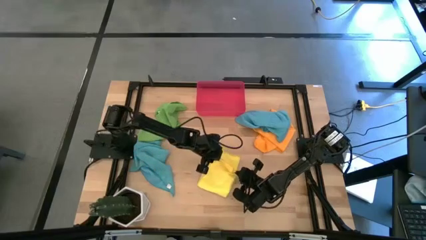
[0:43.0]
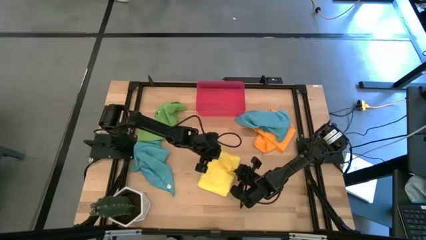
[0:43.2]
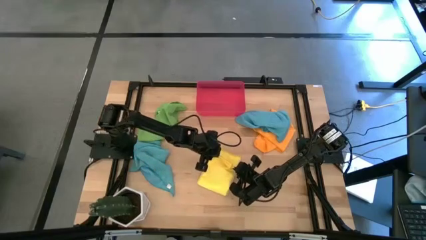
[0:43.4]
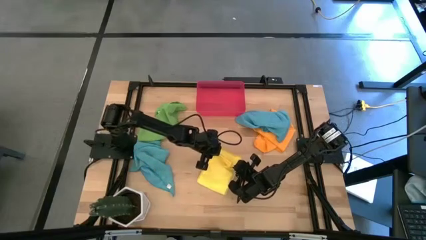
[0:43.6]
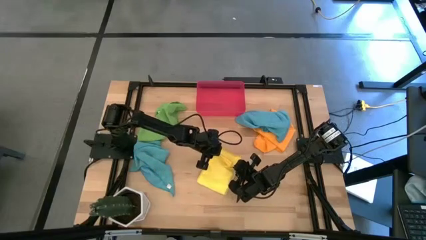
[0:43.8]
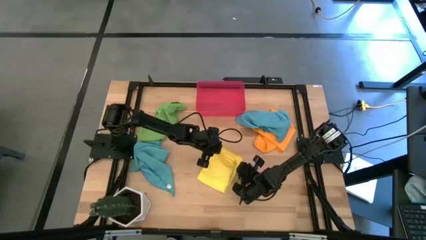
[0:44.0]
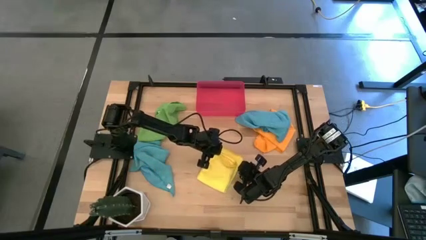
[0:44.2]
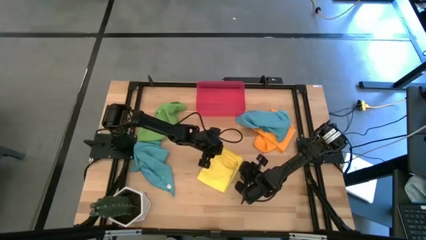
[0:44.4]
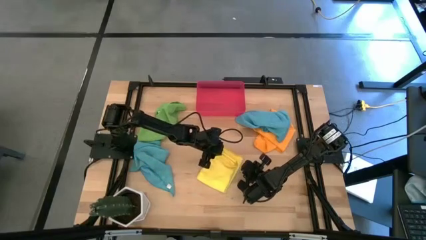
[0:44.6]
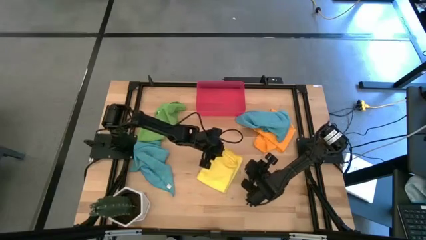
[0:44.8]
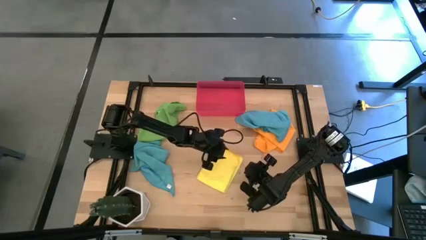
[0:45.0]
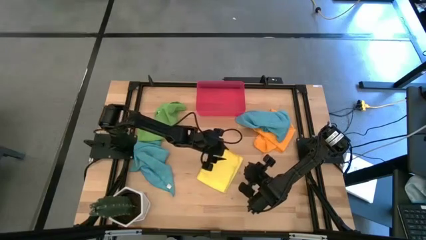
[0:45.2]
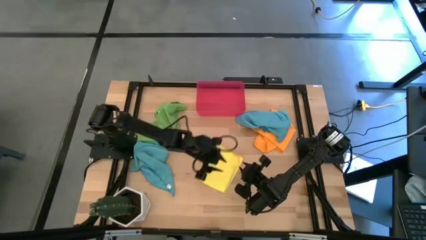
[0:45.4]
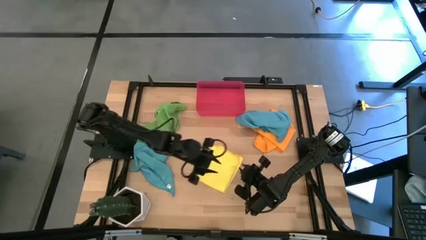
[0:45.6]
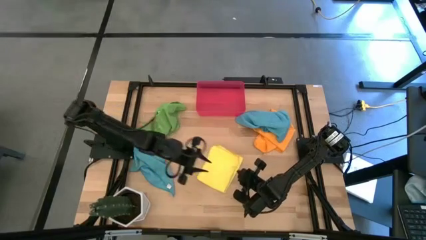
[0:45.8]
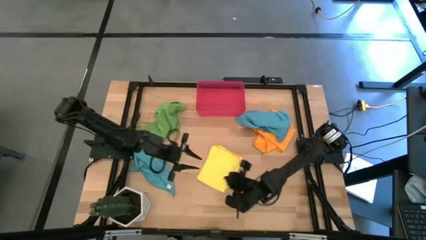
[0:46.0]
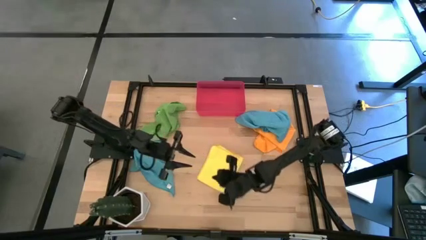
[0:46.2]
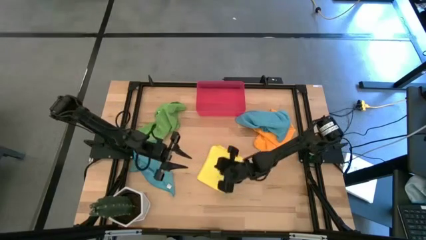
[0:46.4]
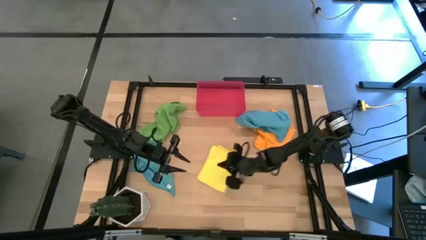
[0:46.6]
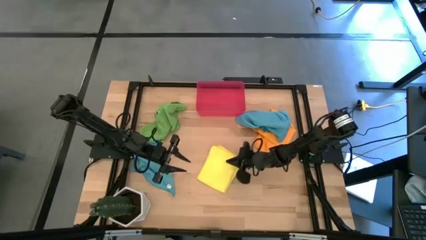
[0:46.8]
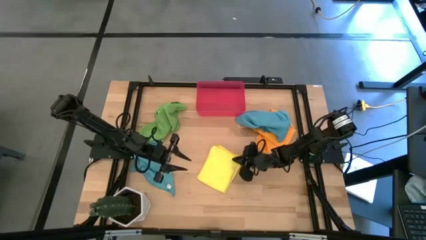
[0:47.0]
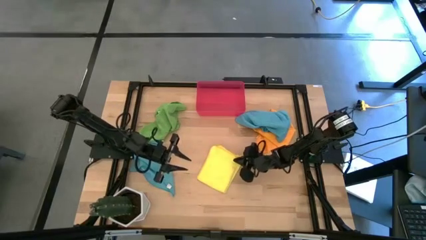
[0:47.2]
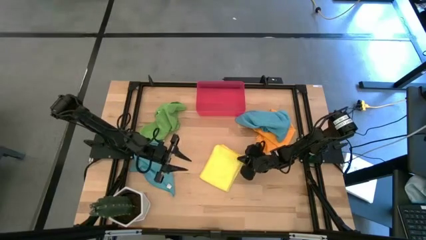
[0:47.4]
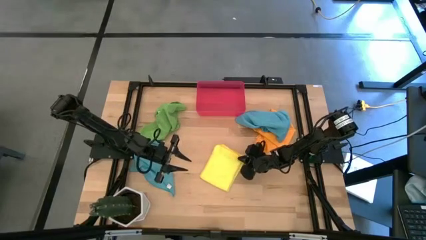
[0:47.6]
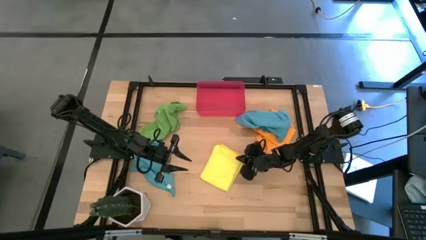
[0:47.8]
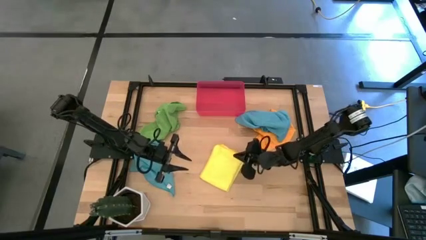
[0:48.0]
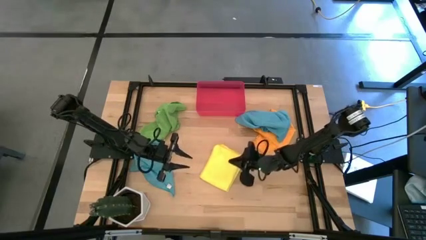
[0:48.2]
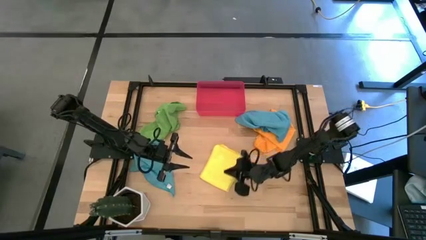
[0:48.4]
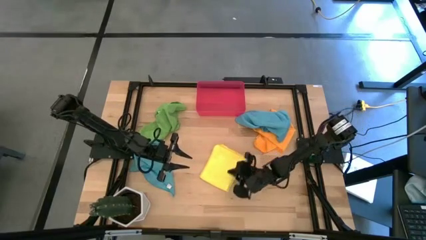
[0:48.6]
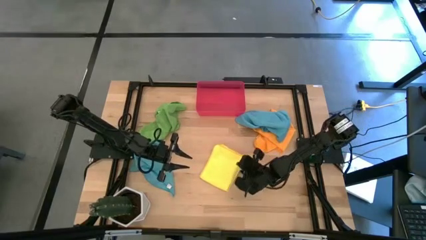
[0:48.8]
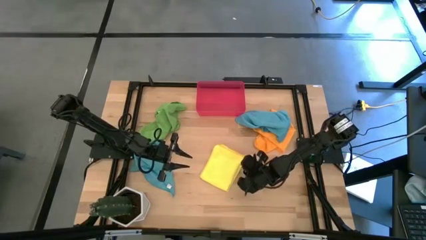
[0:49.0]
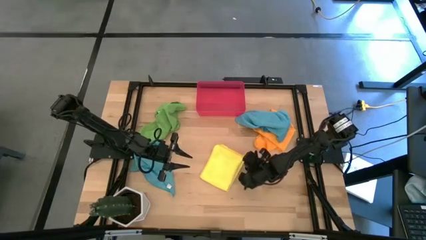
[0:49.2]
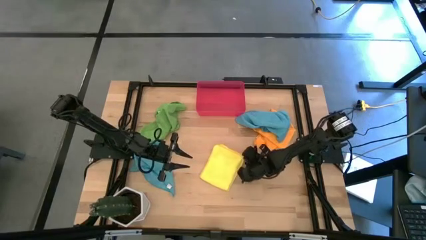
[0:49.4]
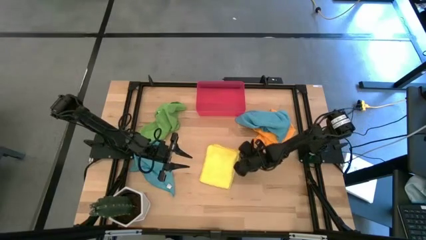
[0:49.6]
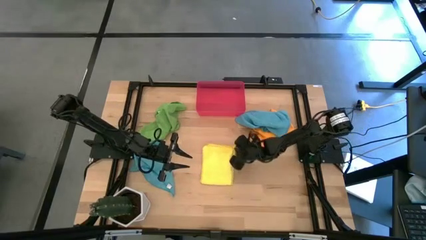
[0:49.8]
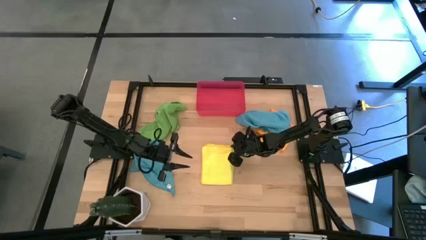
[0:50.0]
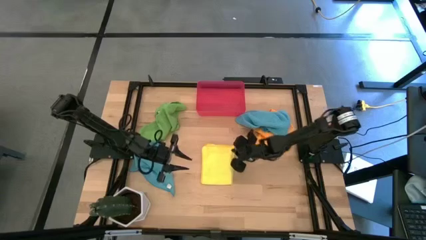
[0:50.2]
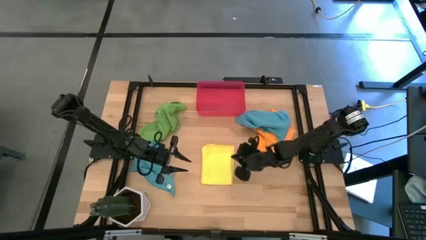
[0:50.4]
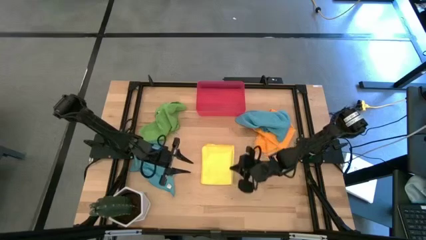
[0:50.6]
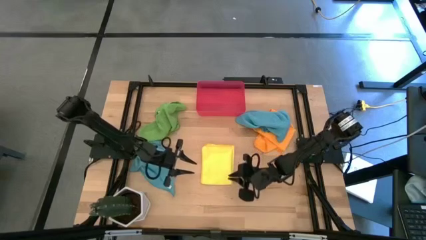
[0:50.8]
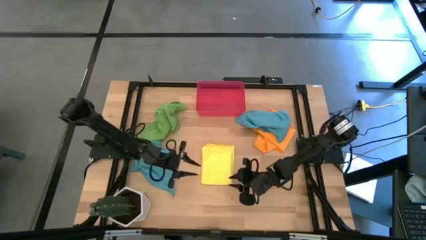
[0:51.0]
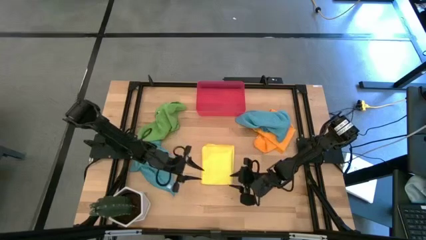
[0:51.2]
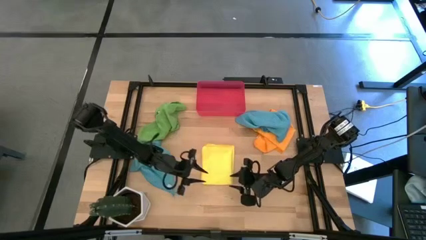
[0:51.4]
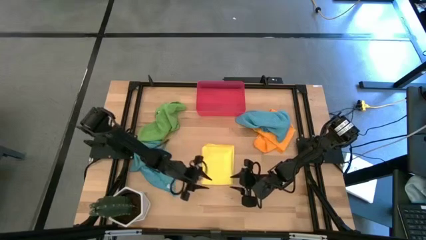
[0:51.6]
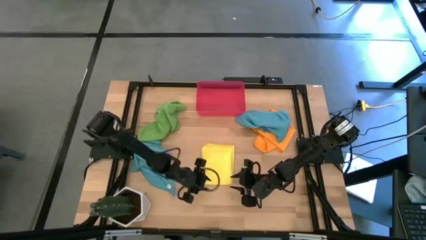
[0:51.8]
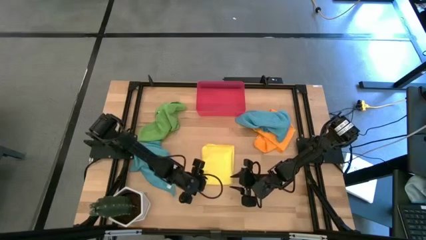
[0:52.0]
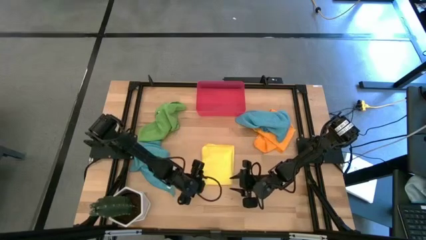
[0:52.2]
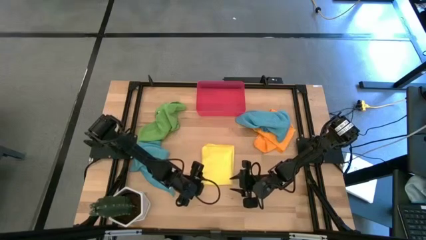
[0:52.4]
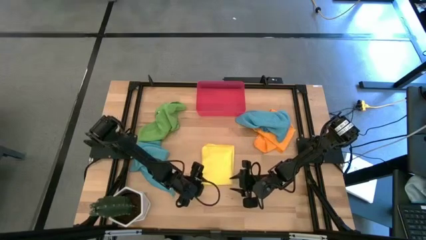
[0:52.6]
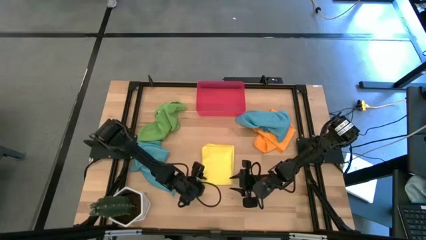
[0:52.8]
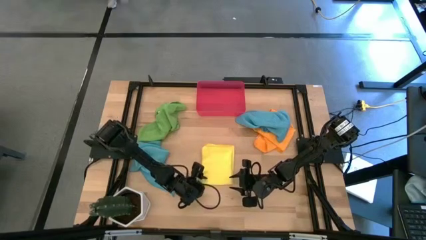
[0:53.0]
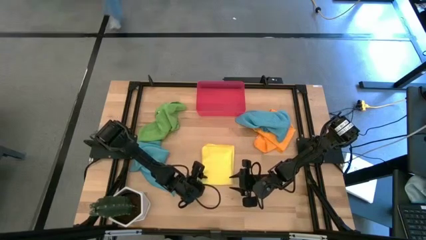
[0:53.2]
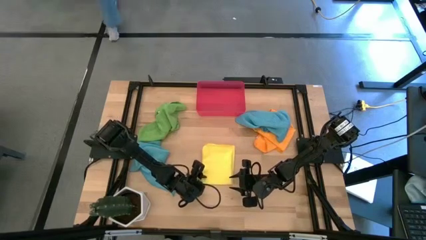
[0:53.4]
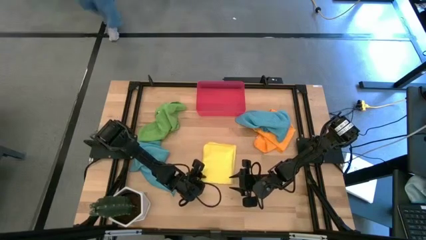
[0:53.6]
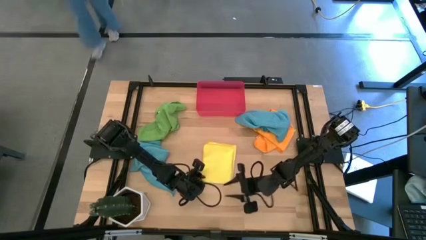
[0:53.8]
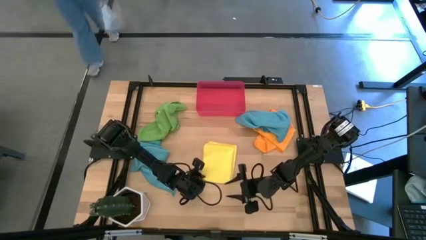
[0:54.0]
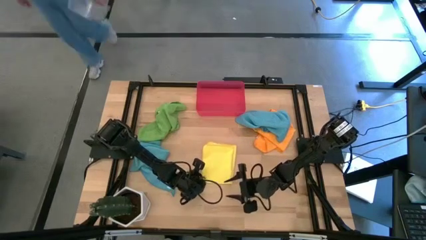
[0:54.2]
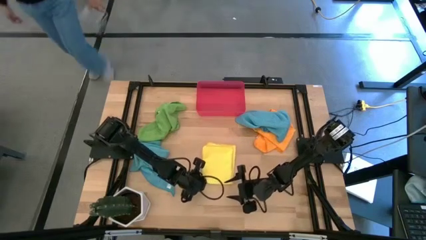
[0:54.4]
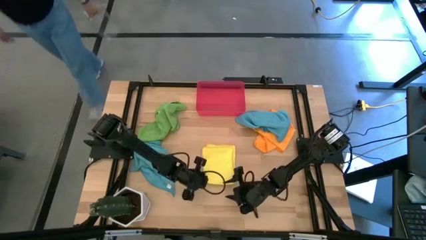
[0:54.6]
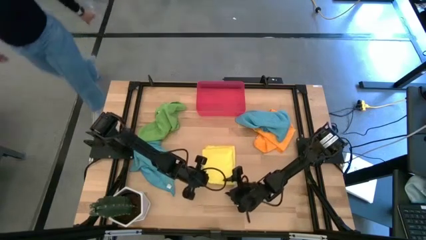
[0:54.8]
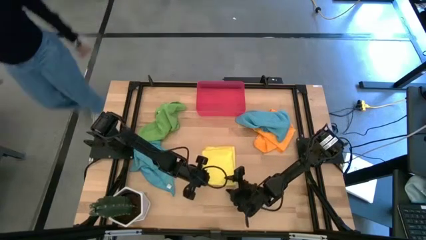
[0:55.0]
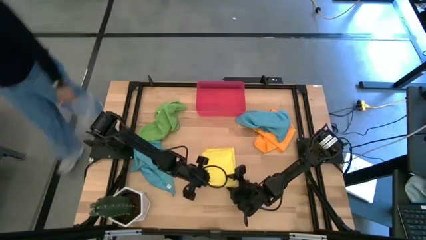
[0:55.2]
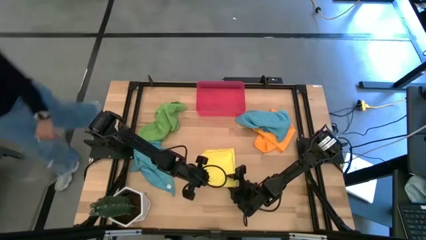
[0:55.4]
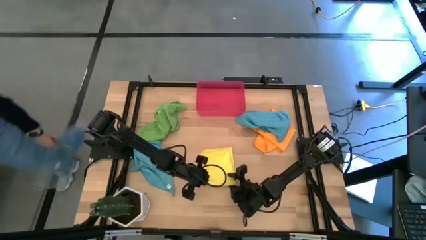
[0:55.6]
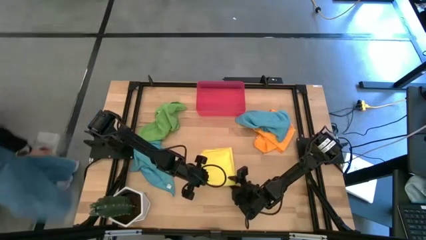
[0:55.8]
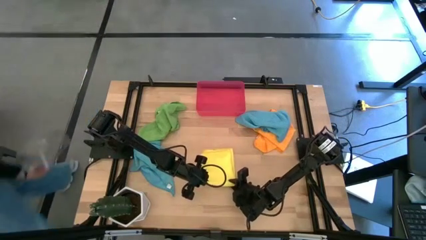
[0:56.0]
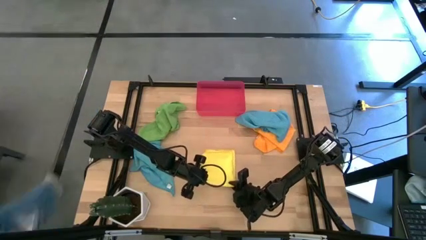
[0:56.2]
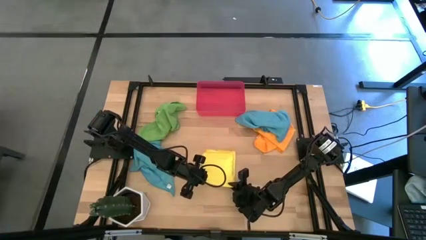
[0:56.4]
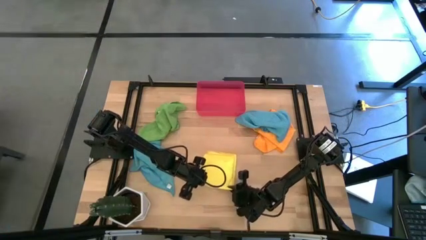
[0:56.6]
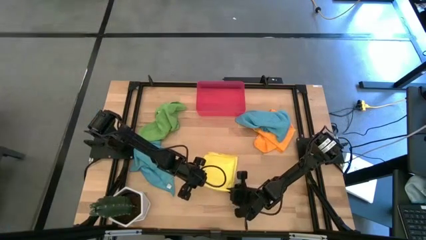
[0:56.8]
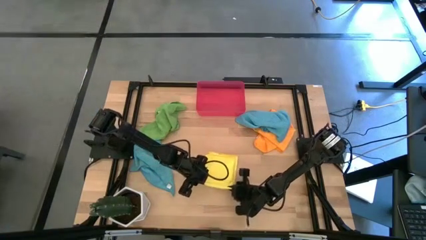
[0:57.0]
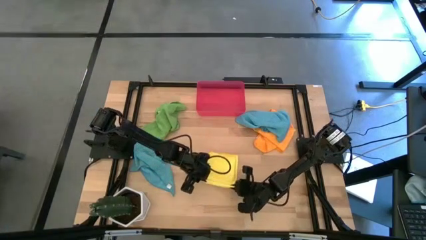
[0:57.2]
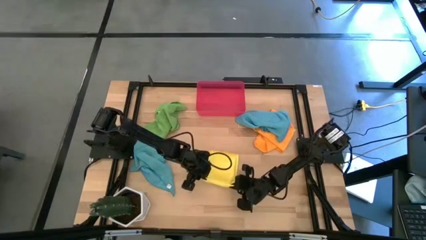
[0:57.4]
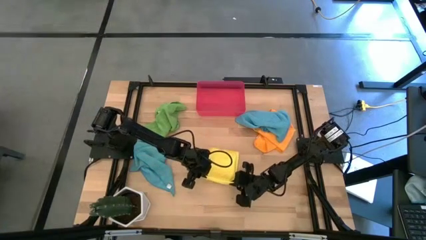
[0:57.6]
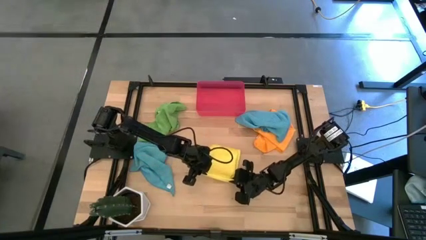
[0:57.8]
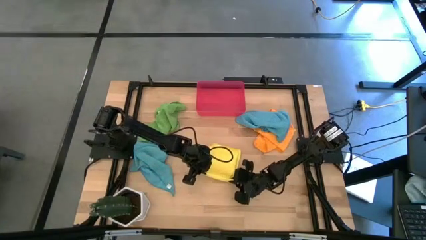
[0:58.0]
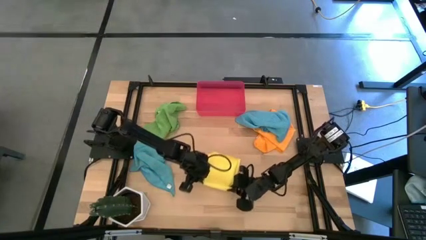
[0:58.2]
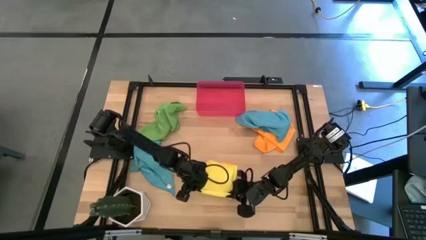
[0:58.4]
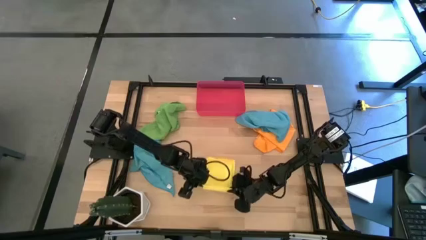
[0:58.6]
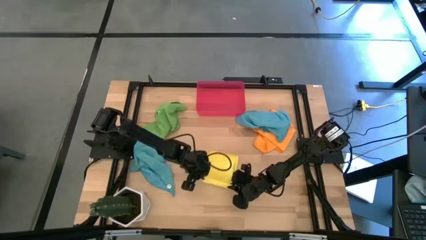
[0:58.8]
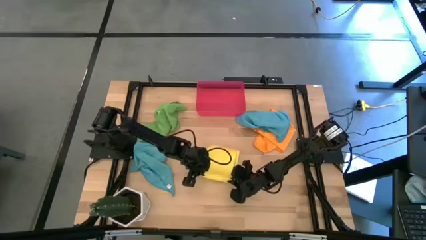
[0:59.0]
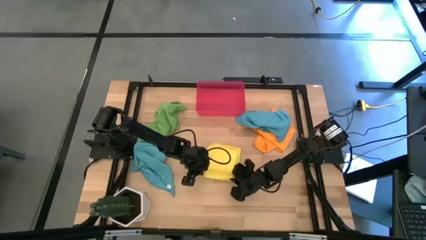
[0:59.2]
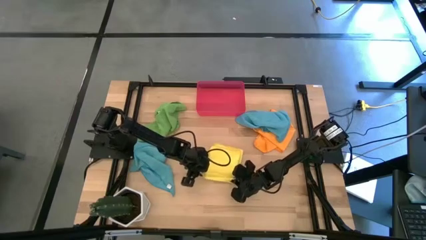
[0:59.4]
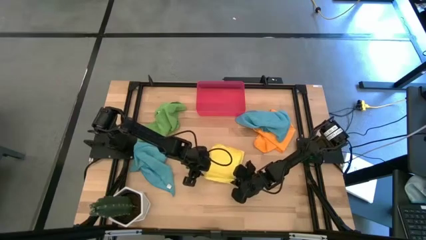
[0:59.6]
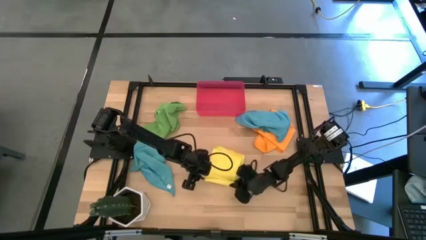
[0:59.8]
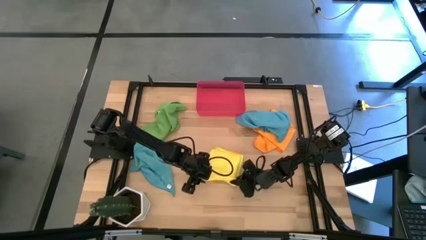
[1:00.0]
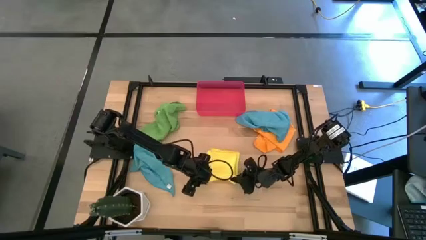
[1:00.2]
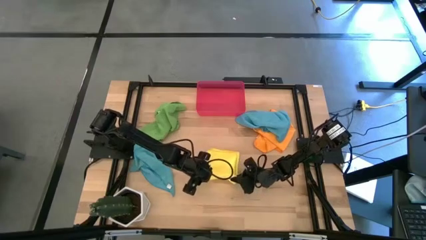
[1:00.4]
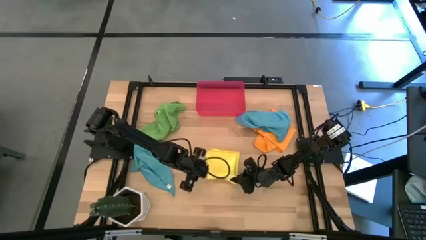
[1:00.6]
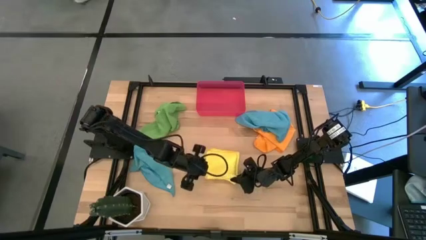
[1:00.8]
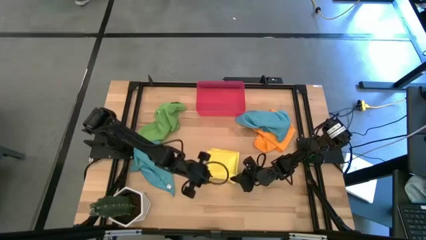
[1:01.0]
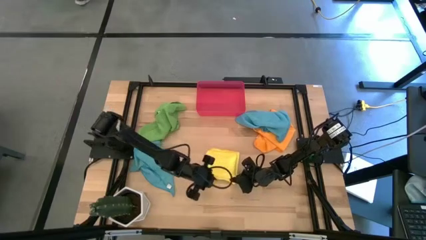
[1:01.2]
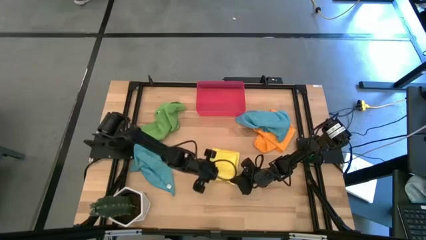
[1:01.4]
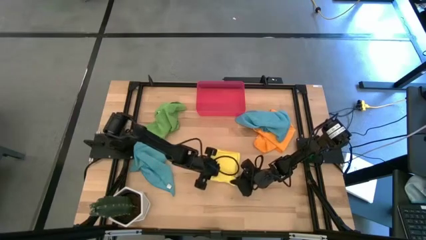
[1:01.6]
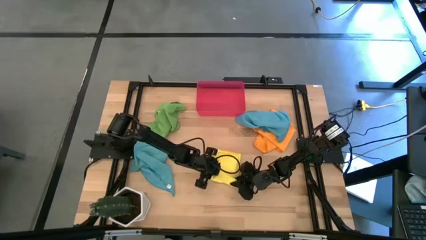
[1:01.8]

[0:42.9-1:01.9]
Task: Roll microfiber towels into tight, uniform cylinder then place into a basket
Roll the yellow microfiber cloth
